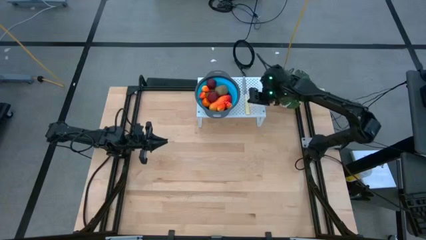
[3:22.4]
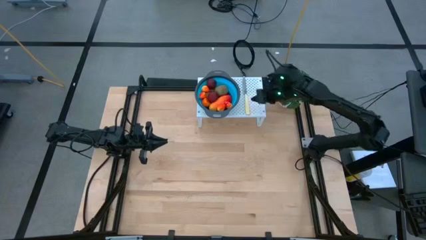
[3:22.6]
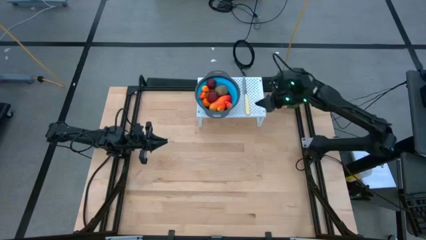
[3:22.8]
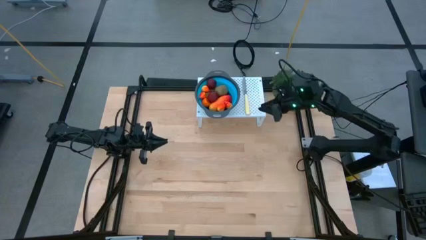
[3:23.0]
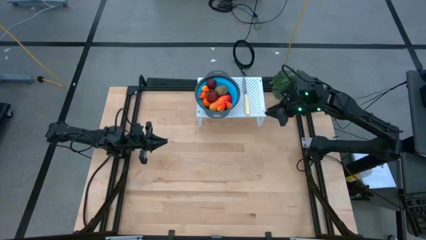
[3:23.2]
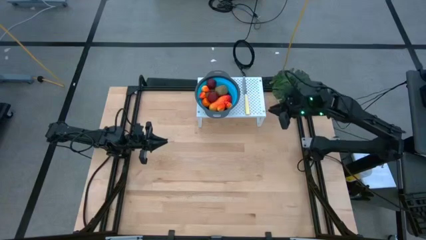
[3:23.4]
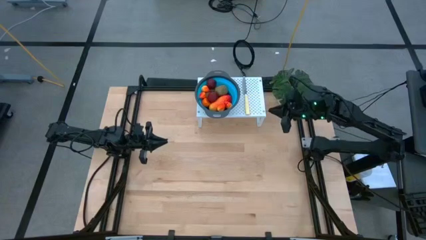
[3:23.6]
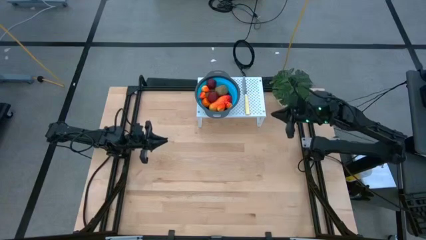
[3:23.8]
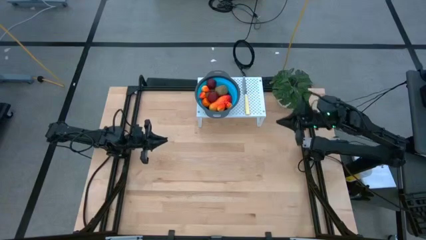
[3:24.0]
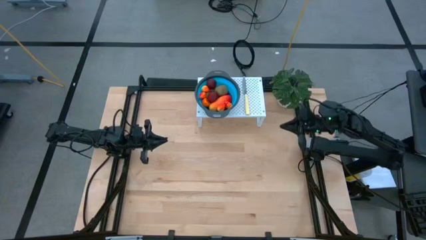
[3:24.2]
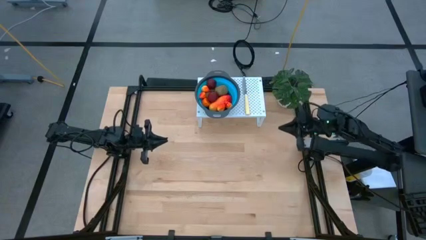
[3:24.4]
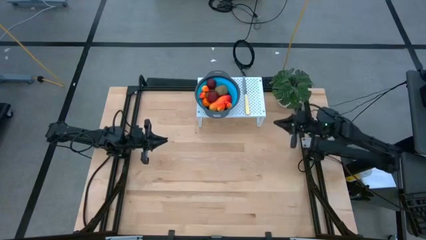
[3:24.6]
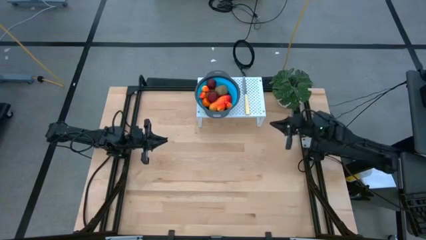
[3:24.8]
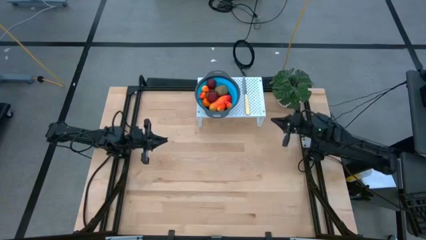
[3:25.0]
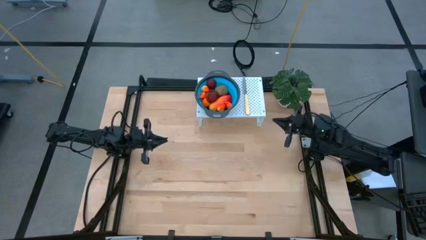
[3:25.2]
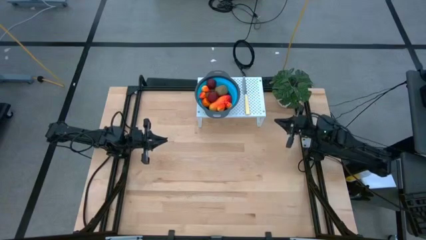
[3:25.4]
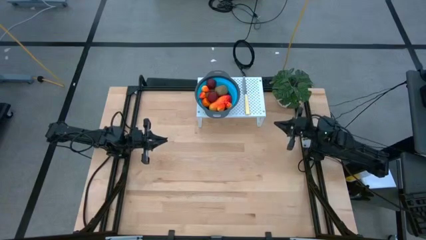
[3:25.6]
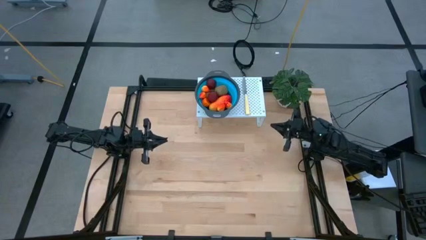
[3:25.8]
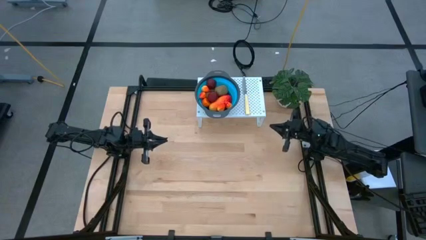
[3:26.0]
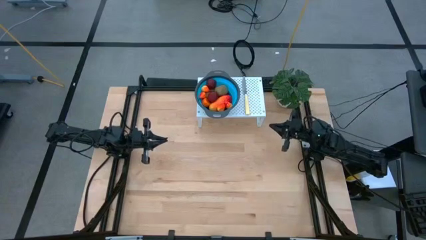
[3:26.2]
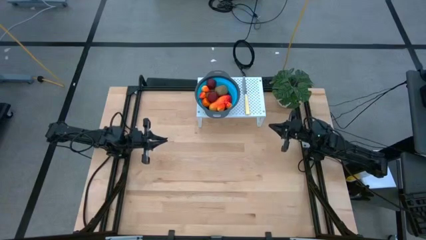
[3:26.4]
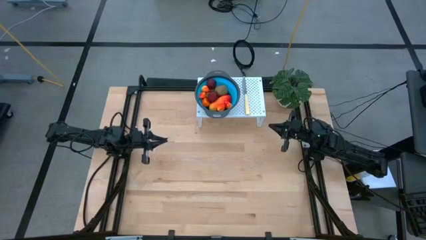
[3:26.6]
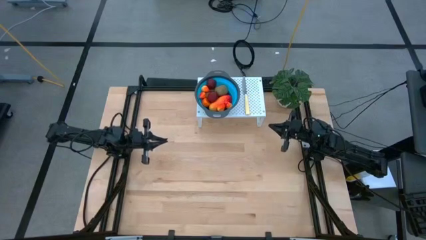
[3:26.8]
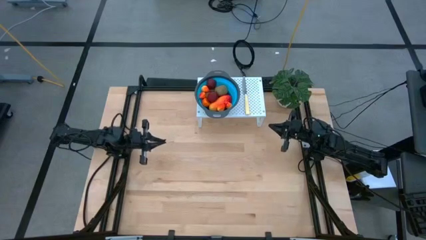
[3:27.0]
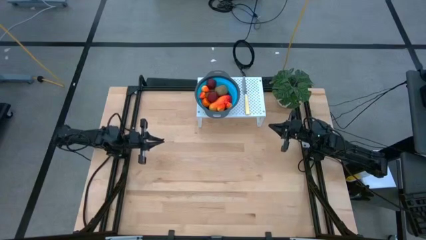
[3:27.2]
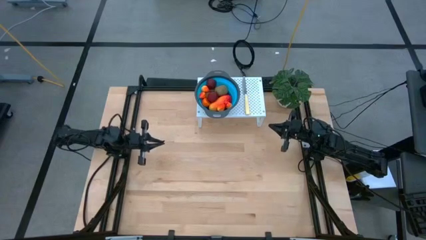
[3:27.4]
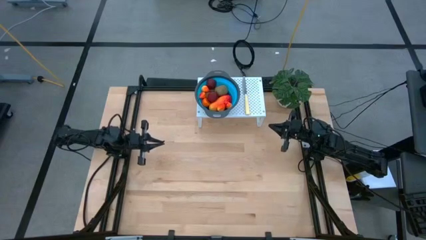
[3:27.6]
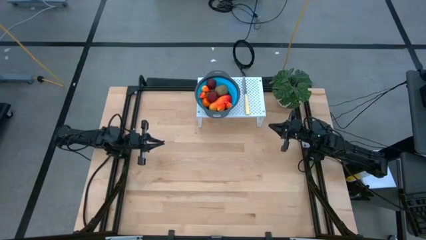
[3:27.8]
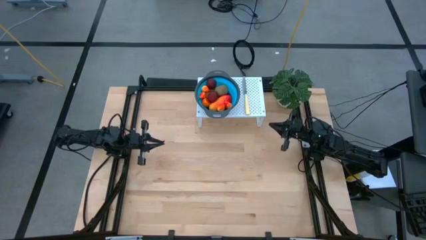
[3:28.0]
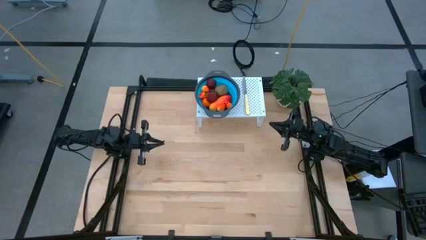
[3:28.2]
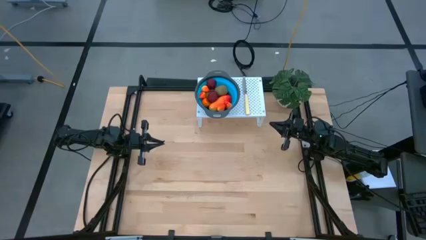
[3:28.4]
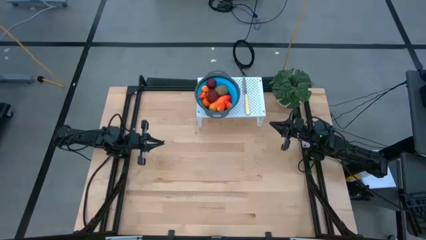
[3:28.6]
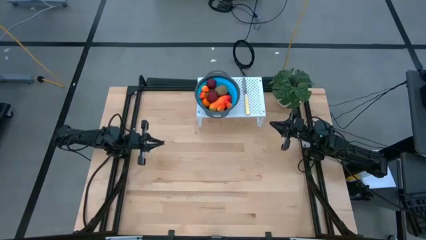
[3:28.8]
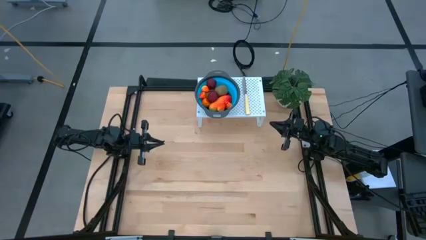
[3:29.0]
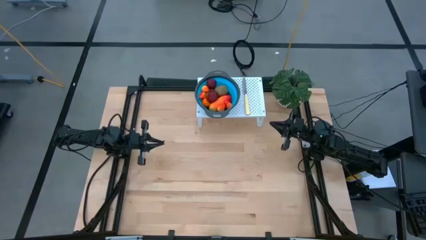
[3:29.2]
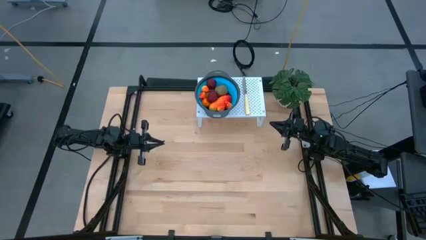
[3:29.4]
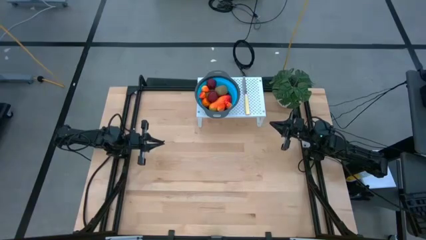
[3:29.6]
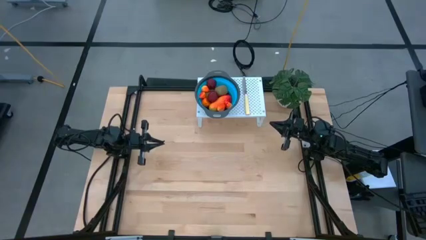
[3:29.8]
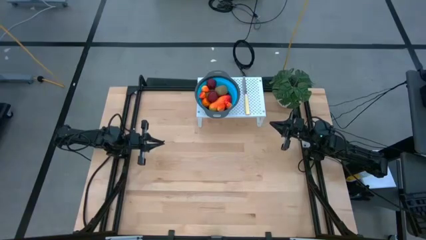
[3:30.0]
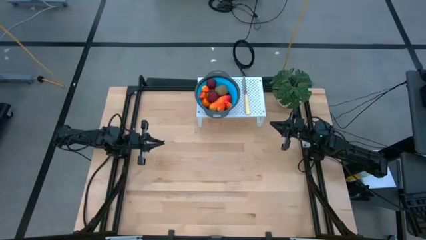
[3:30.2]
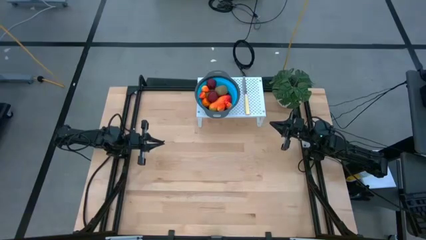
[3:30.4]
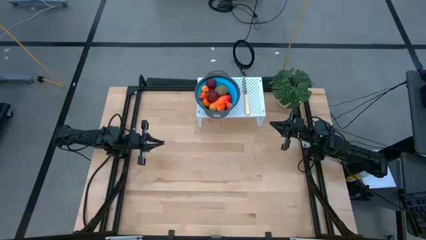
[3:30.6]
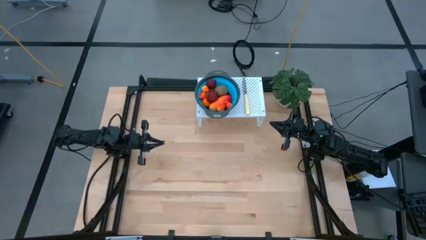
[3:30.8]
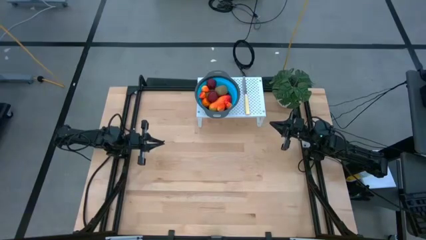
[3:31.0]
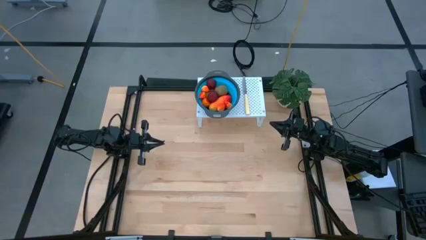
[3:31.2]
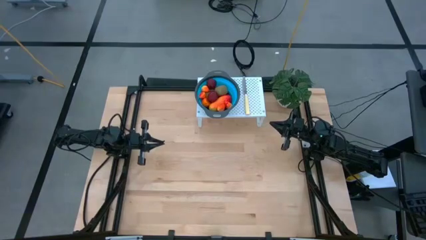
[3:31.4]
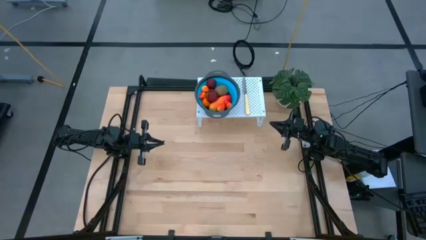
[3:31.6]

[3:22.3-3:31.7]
Task: Pick & Place Fruit
Return to Home Position

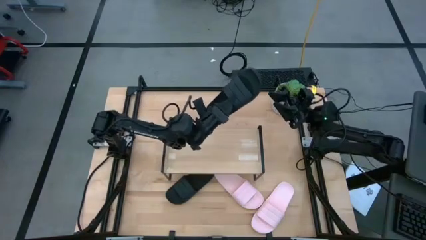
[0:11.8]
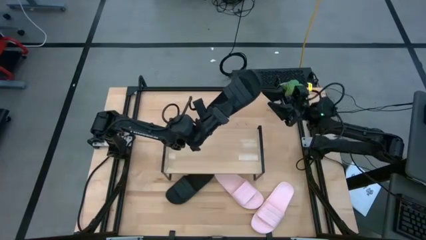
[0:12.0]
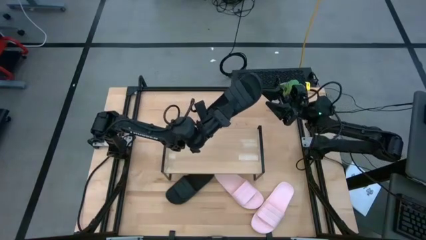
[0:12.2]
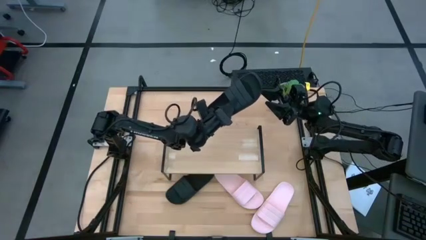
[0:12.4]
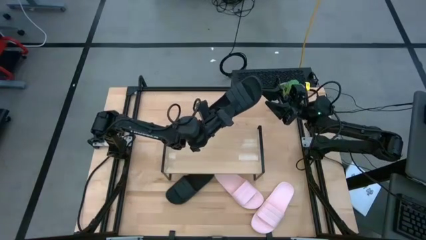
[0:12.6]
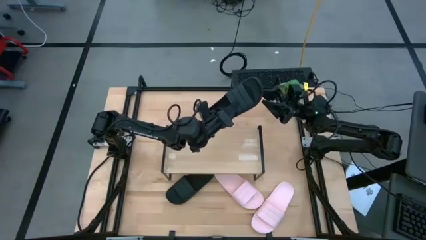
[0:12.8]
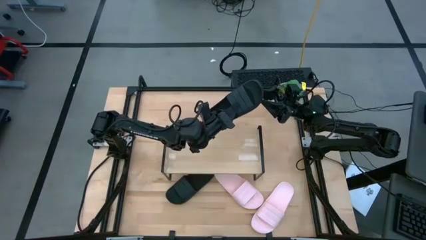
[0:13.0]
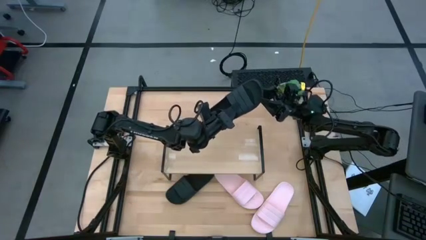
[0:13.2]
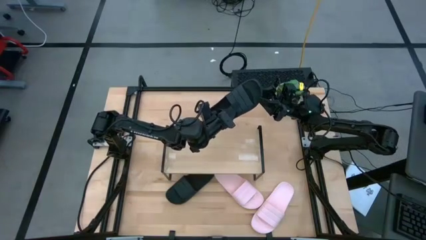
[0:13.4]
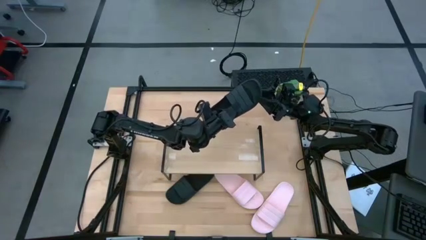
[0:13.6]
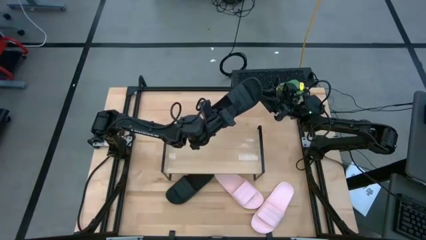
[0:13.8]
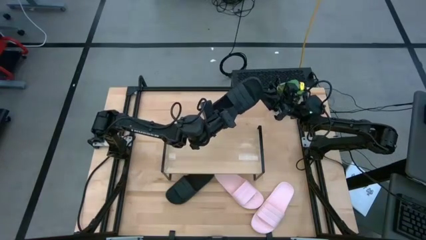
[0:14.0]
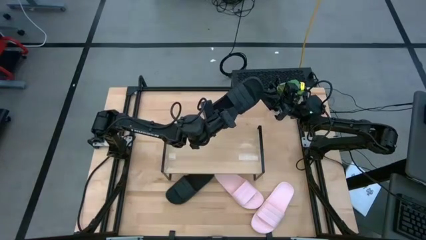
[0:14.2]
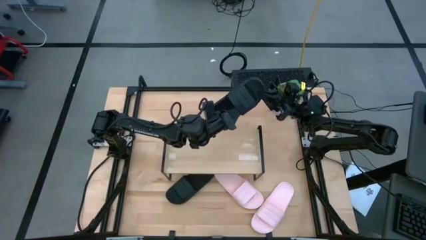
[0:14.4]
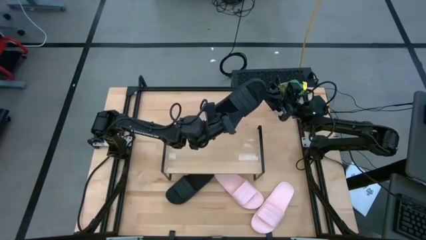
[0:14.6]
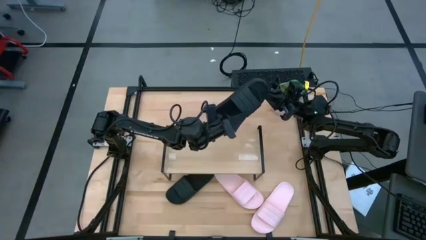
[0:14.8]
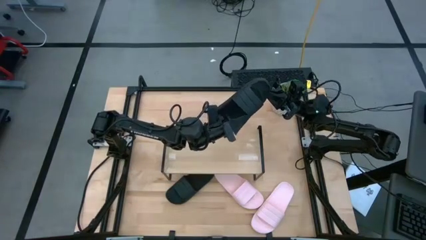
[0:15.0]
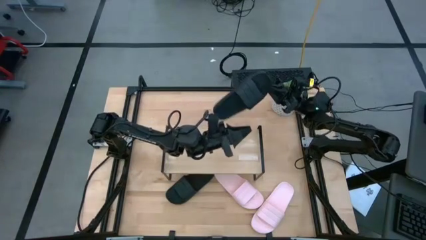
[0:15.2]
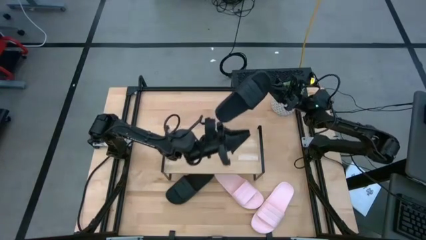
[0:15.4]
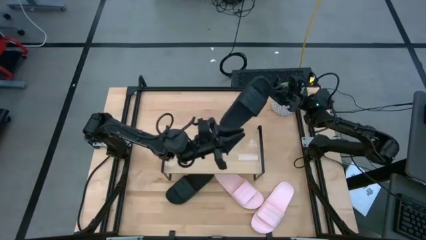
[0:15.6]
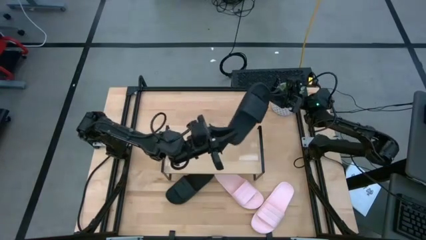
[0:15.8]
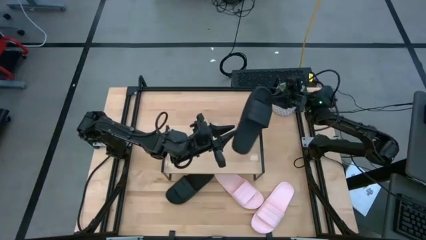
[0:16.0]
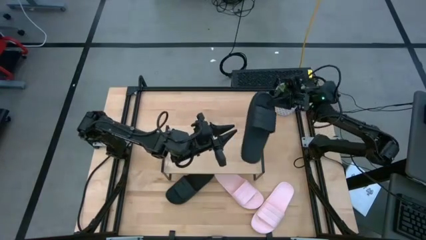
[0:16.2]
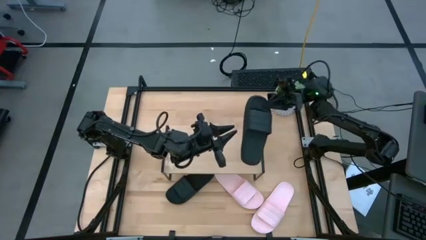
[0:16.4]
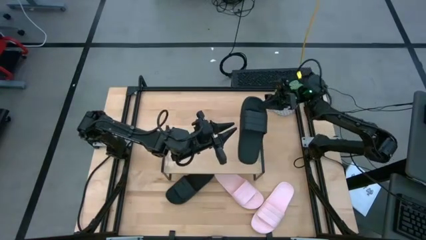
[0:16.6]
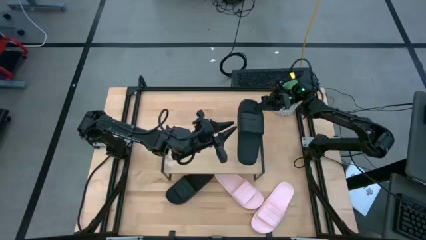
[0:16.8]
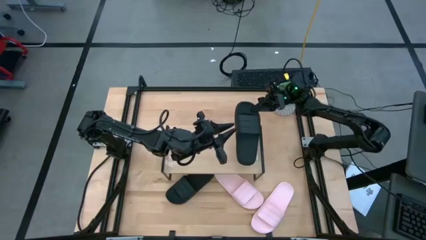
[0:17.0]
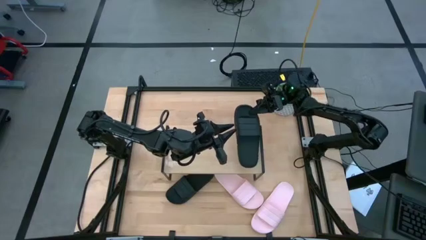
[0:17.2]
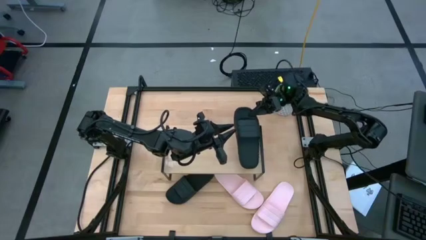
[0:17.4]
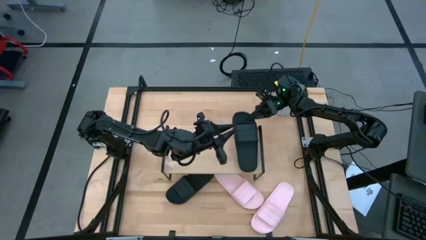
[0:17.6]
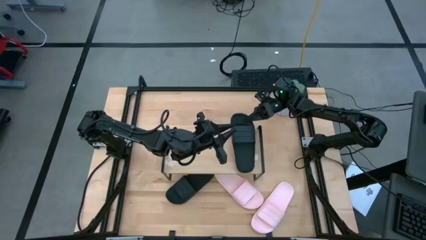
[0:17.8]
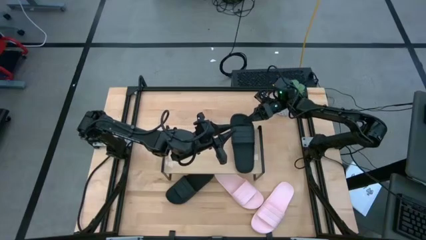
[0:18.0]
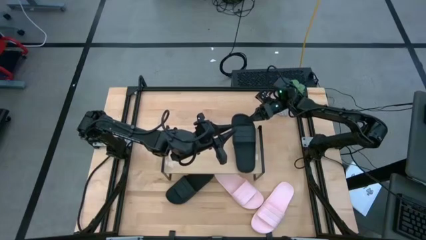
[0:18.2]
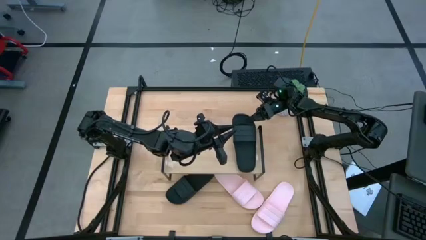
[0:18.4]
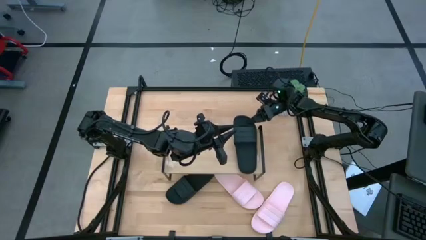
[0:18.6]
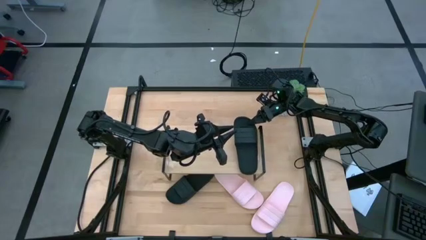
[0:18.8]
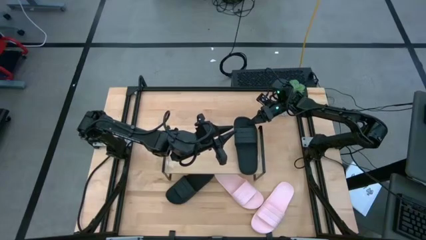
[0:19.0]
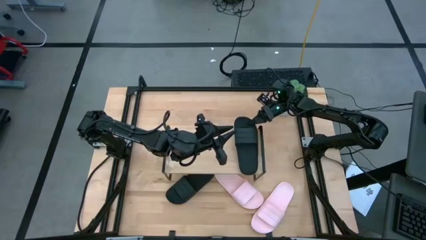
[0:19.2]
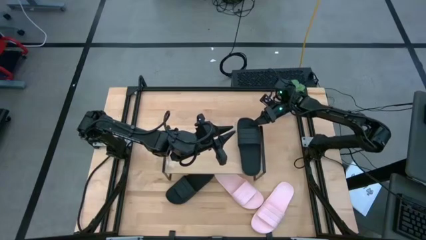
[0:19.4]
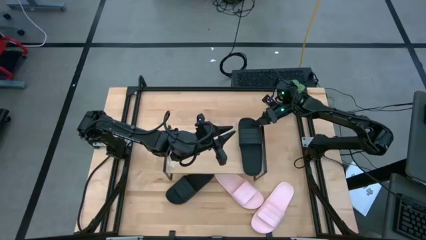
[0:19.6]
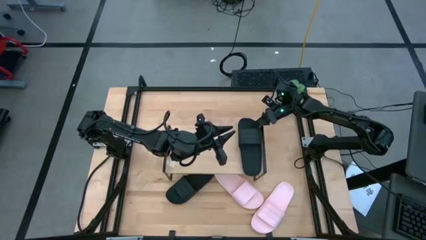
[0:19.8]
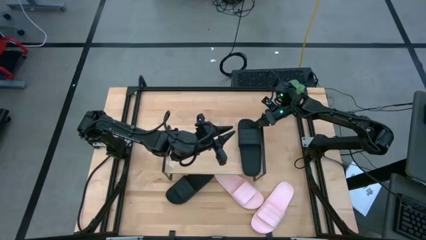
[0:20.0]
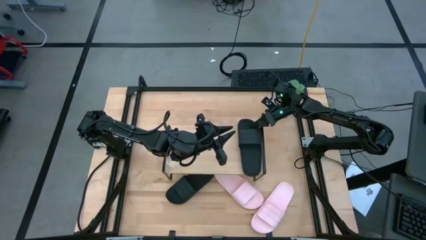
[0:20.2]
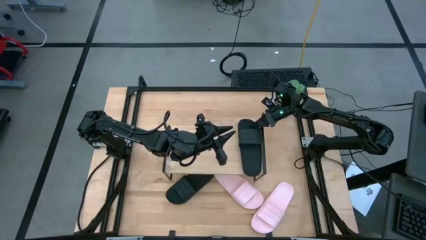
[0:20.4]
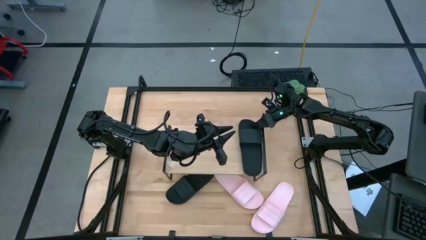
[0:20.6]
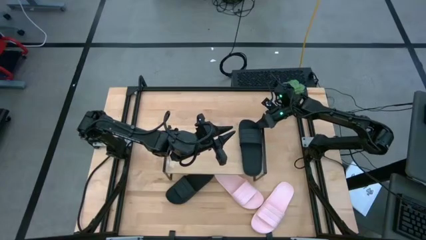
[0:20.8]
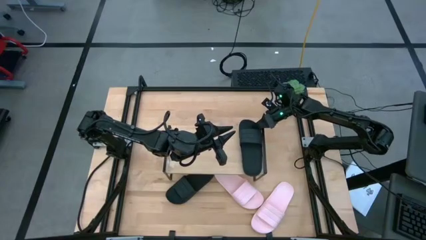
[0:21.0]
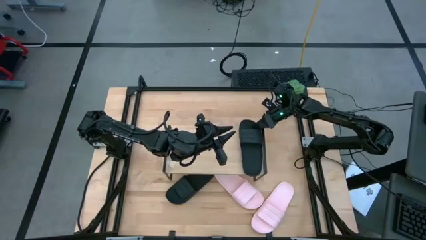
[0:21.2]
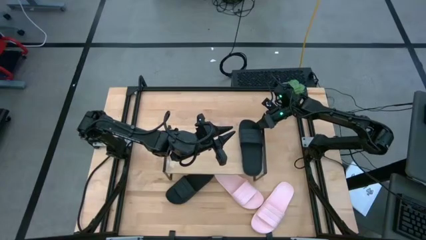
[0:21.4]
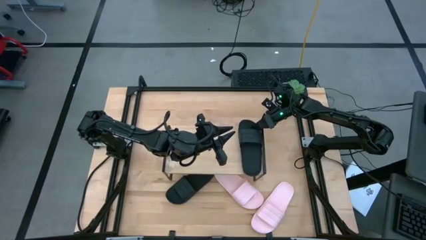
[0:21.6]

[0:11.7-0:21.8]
Task: Pick and place slides into the shelf
Put the left black slipper on the shelf
